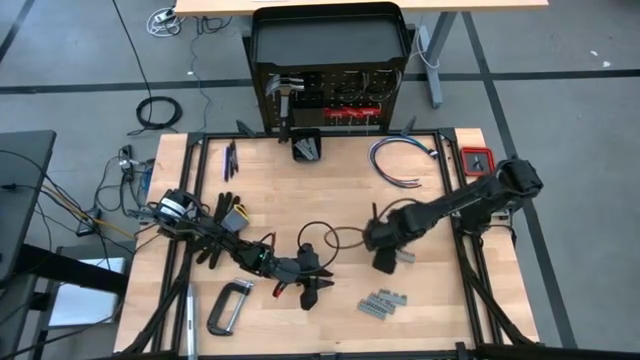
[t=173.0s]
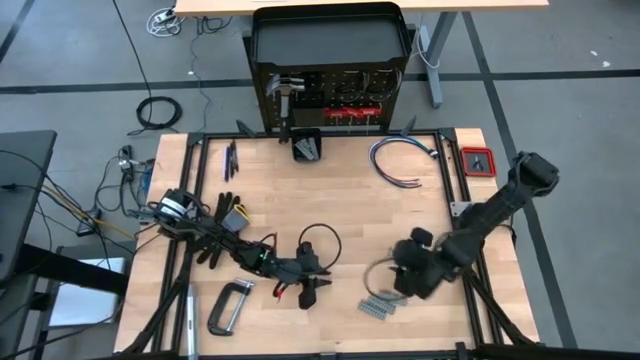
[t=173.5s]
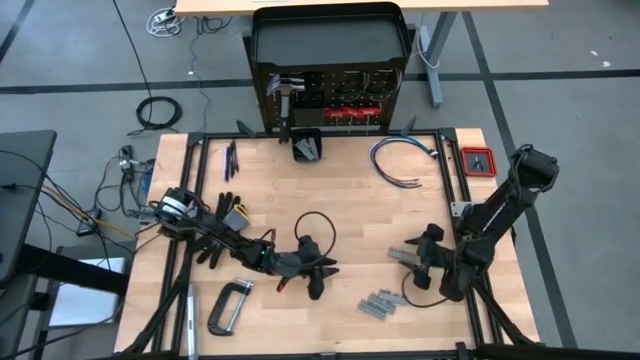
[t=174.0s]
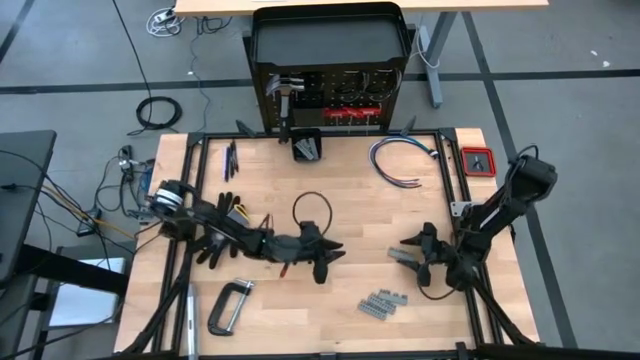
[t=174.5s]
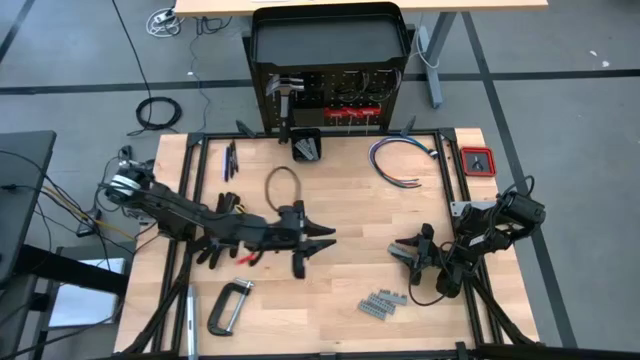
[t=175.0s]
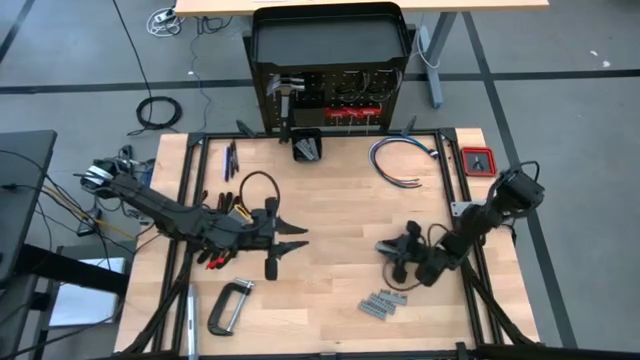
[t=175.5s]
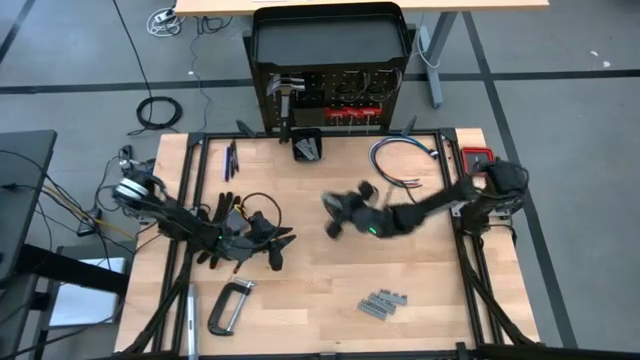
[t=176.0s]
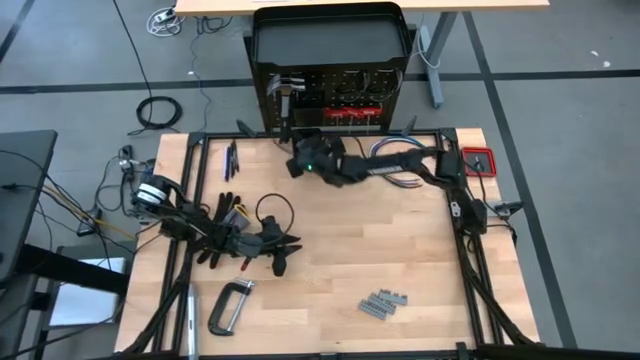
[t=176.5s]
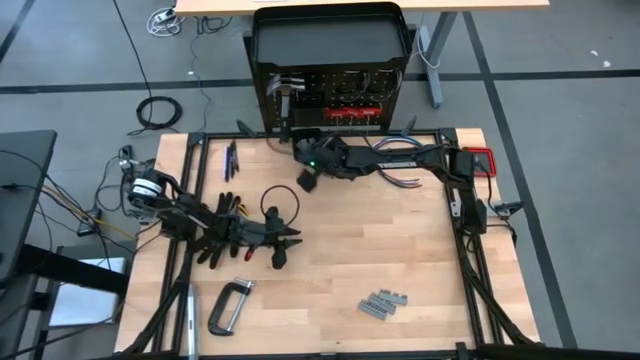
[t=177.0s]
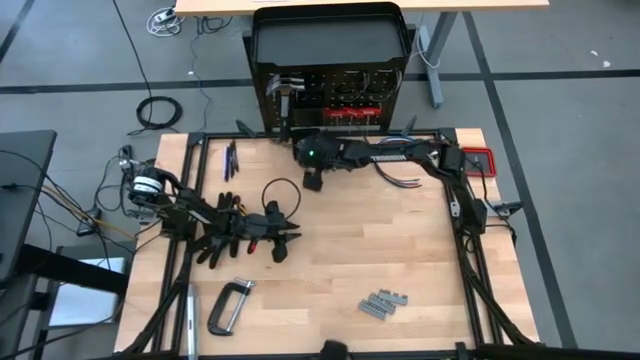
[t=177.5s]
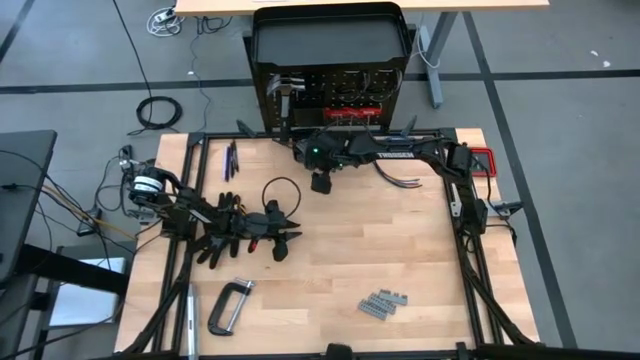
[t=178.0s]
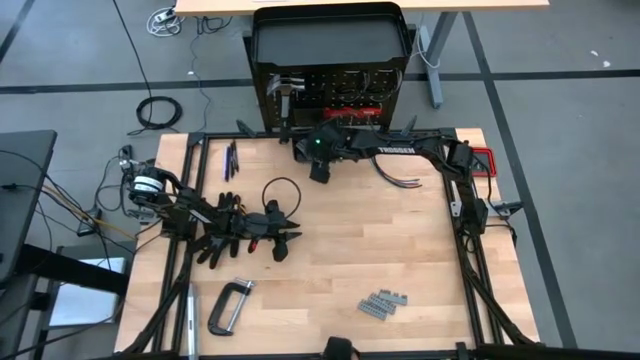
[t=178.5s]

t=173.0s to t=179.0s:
Task: Hang tools onto peg board
Put the gray terminal block into the black bin

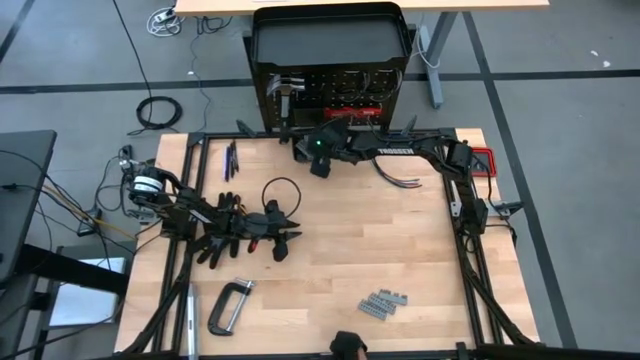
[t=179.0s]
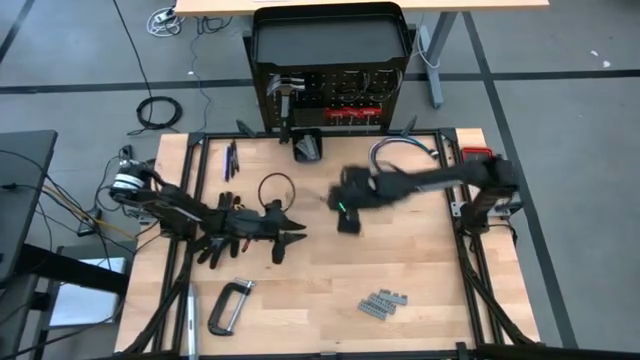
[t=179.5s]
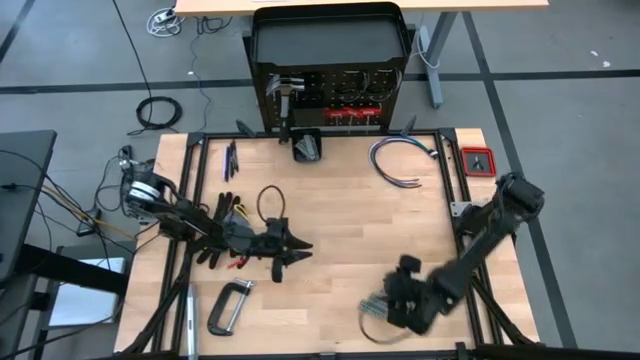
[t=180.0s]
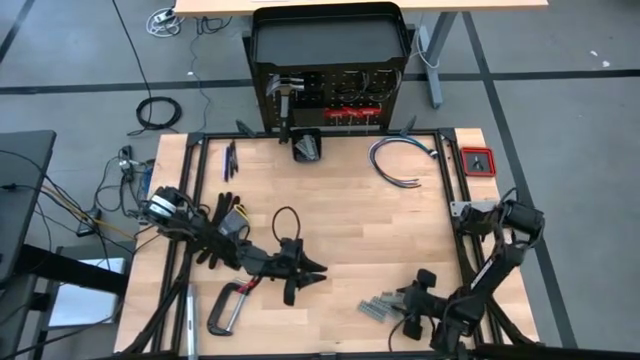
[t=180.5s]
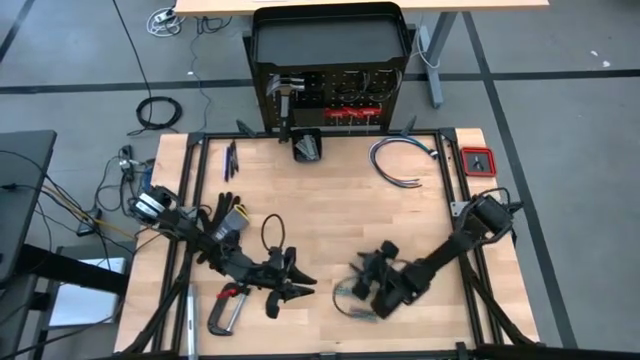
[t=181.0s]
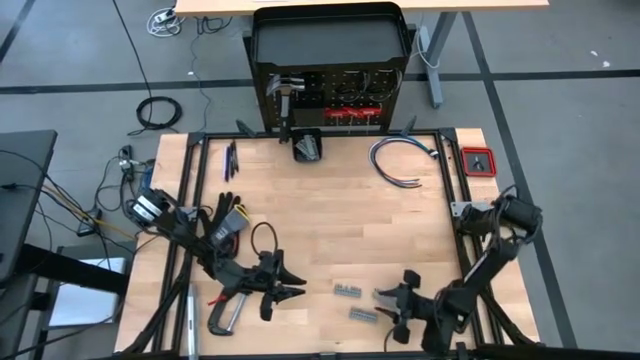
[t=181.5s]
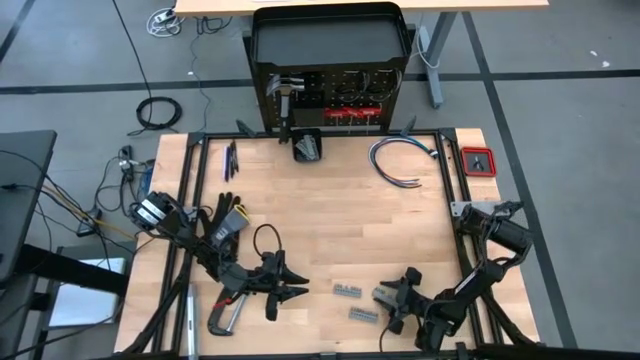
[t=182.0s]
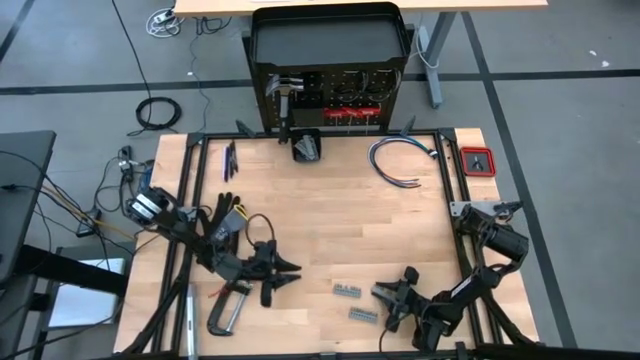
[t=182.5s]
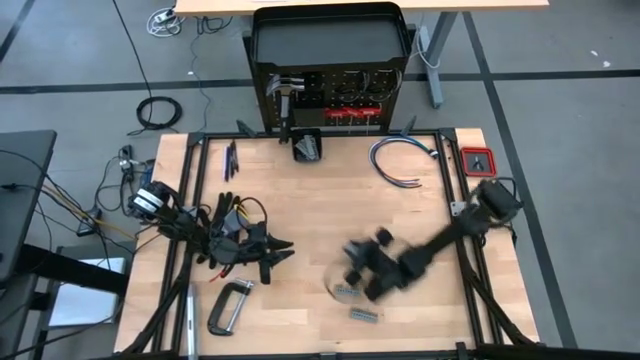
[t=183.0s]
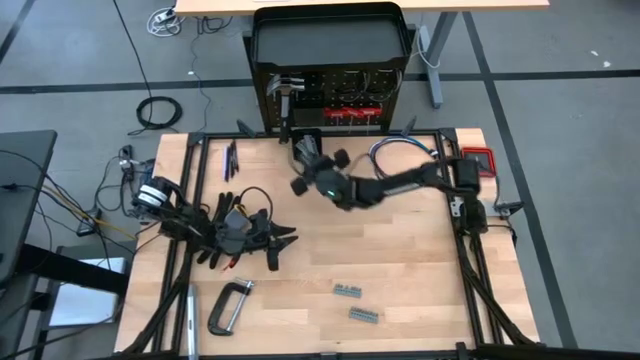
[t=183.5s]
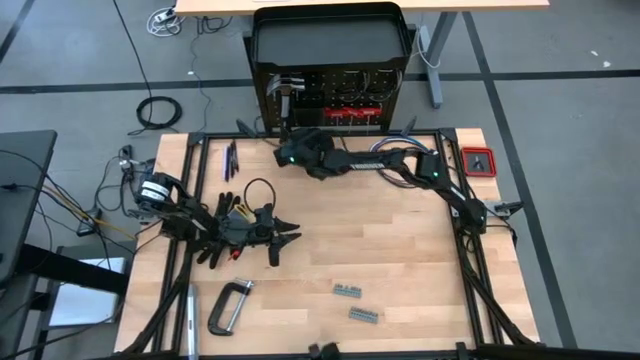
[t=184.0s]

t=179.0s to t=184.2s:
Put the gray terminal block into the black bin

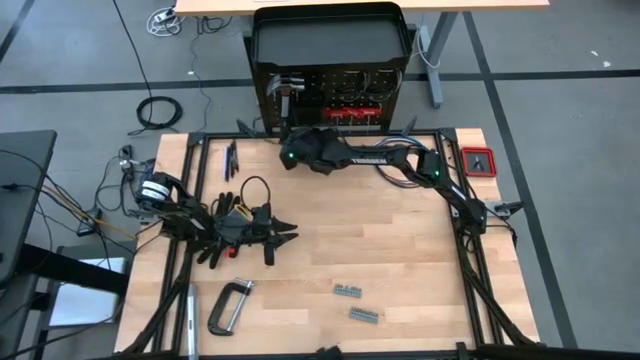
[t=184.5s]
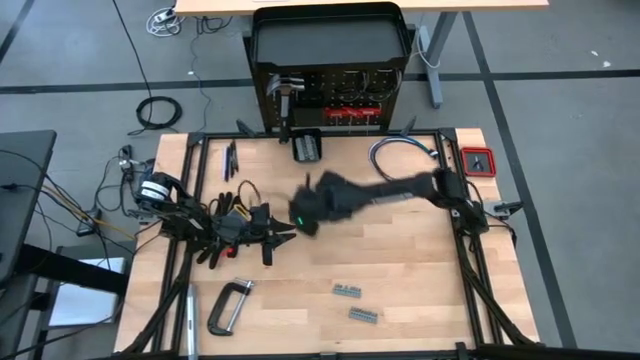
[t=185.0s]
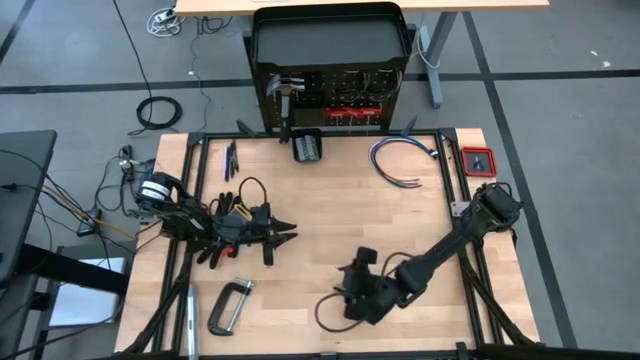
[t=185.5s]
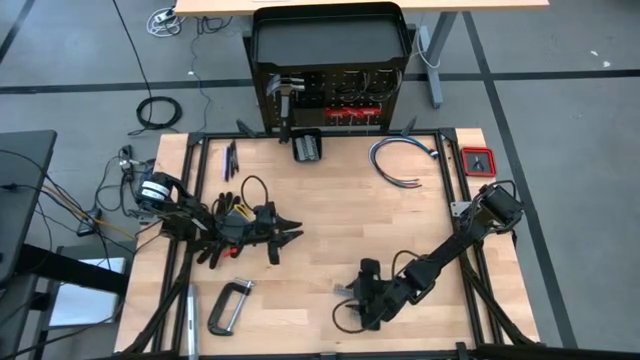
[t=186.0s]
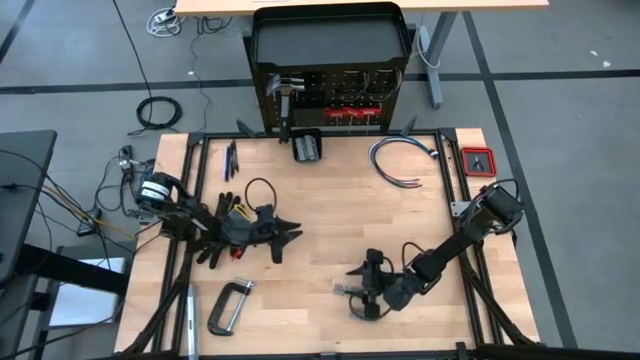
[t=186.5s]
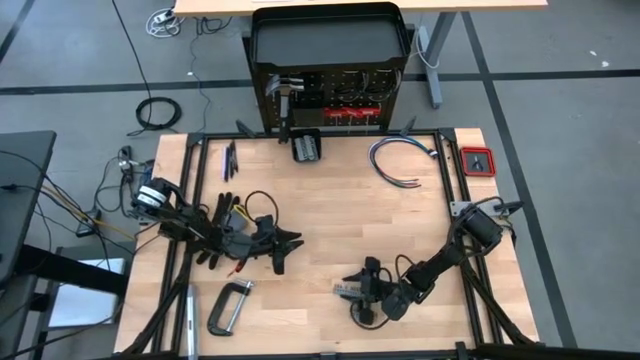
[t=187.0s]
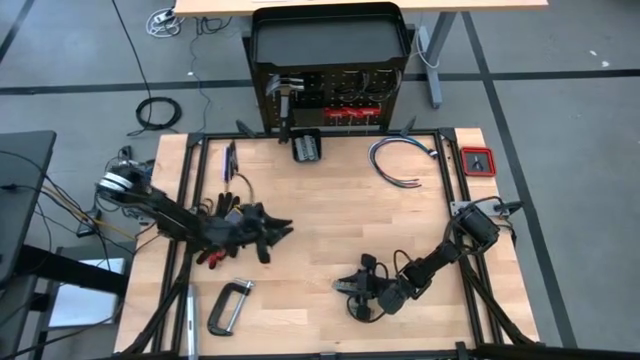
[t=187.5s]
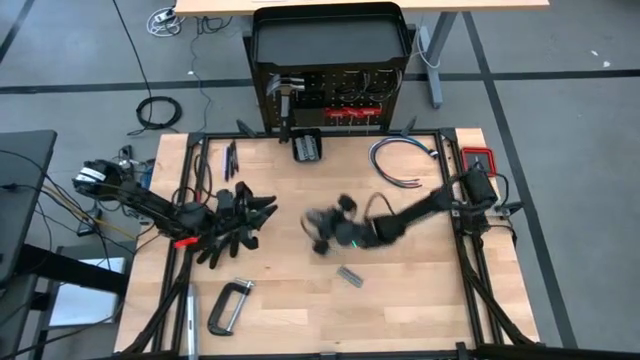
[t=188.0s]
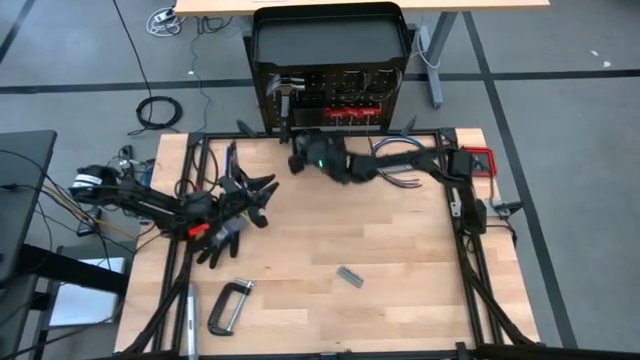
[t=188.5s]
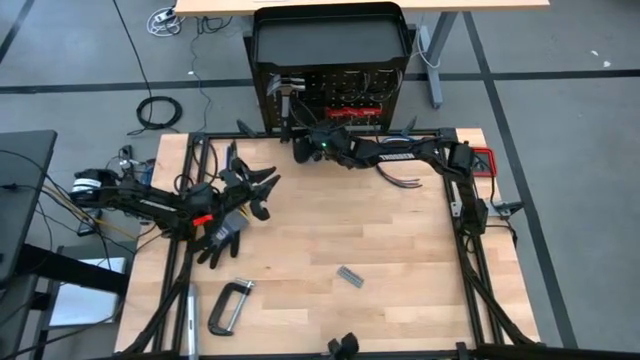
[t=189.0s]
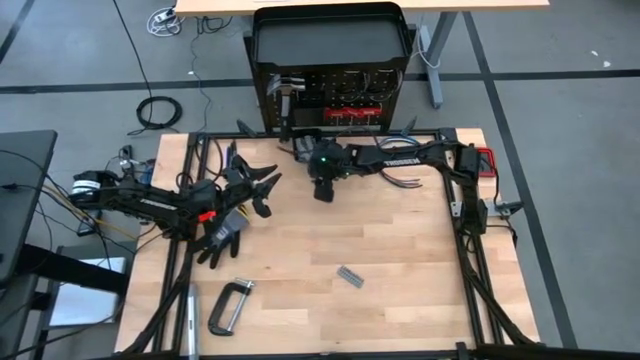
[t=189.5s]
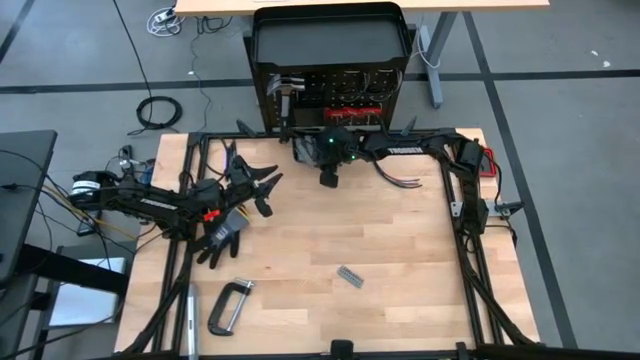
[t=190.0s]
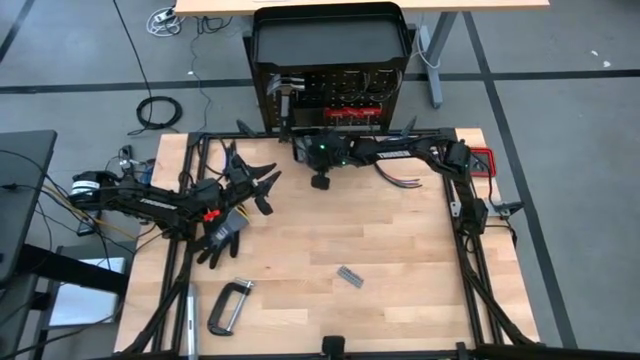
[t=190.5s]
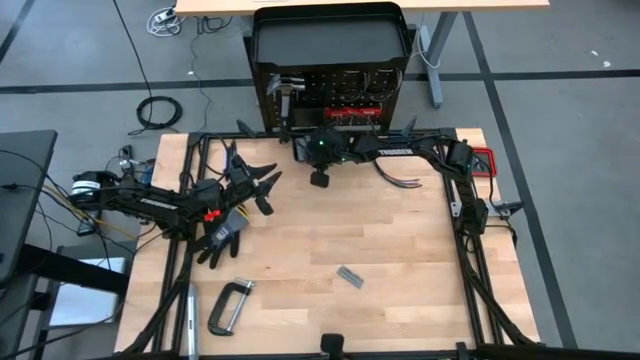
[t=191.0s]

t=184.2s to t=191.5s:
Put the gray terminal block on the black bin

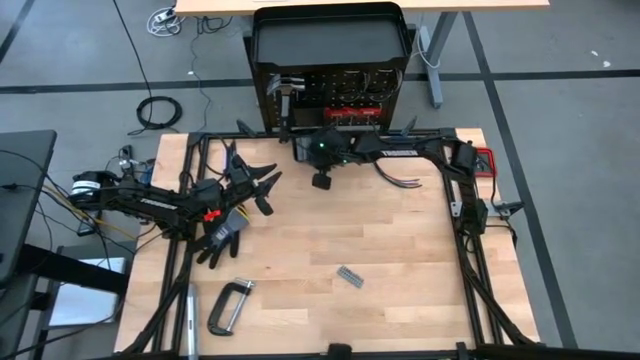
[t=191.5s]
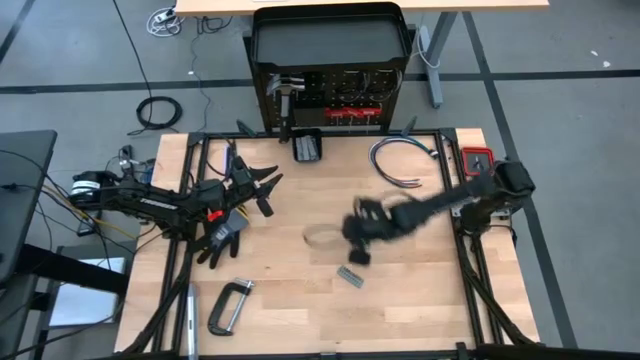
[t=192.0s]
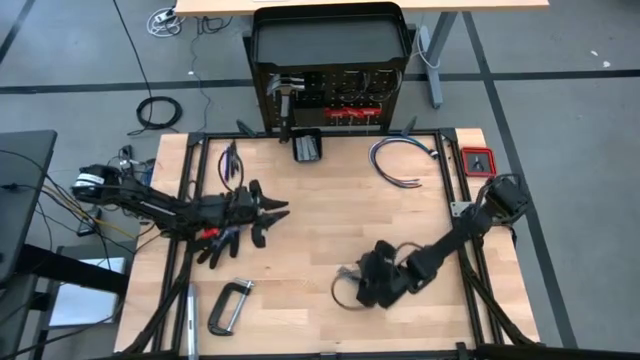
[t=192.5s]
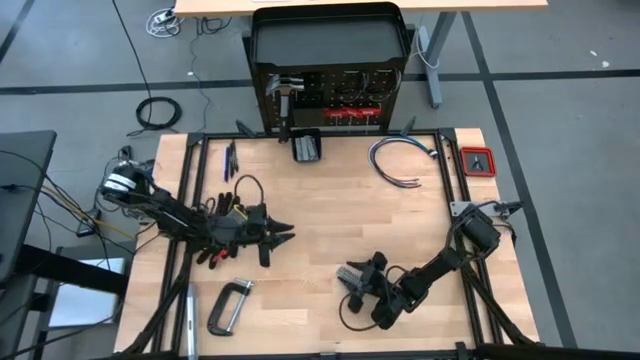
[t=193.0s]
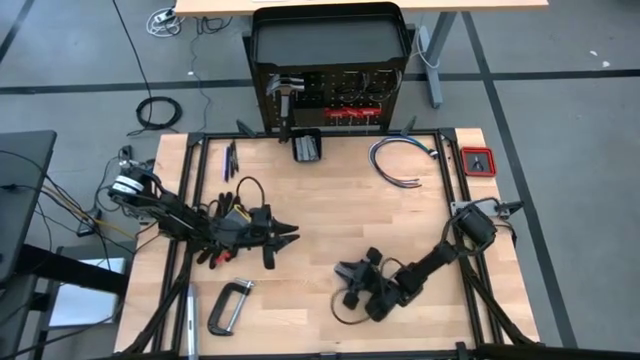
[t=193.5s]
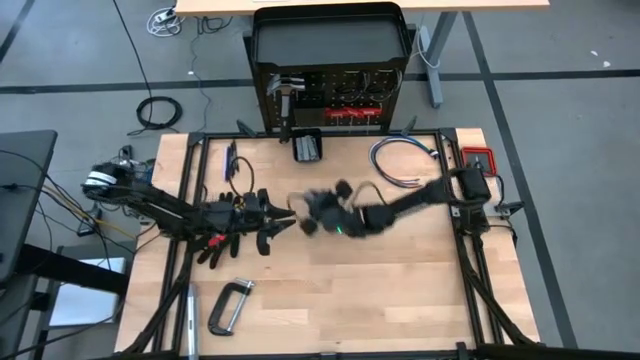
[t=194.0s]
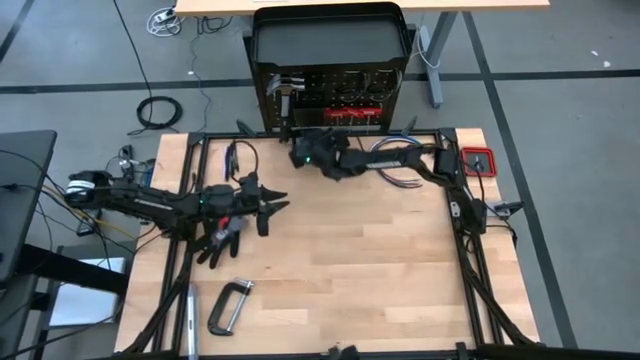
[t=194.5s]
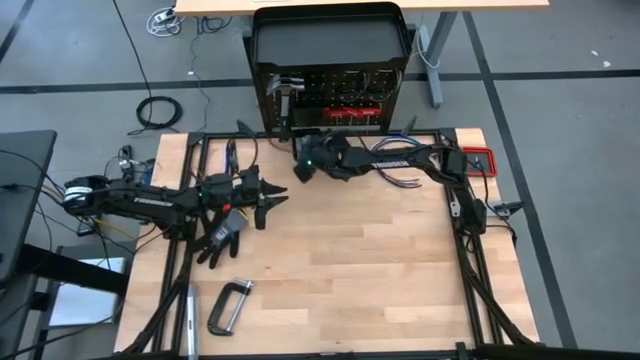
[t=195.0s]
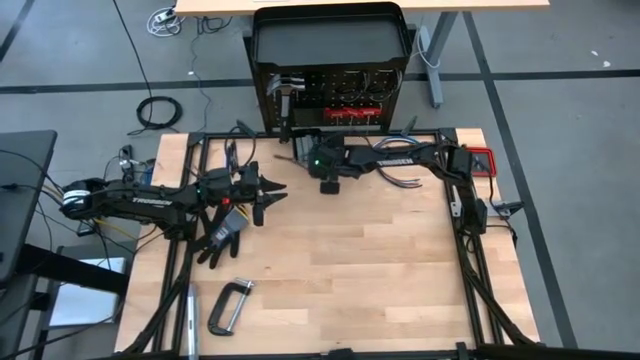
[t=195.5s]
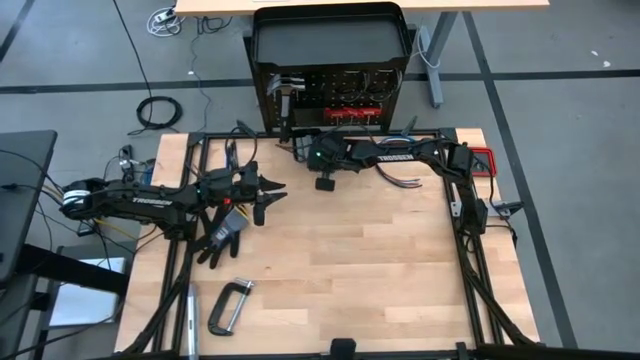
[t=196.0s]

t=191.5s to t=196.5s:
Put the gray terminal block into the black bin
